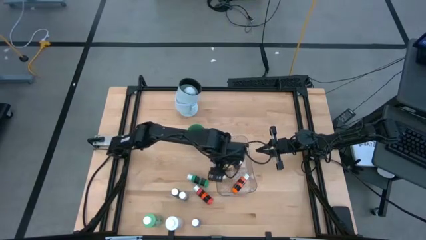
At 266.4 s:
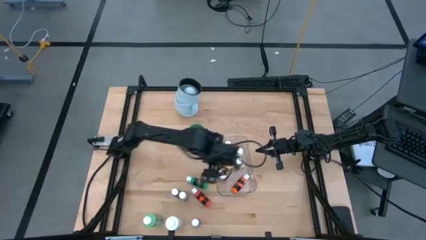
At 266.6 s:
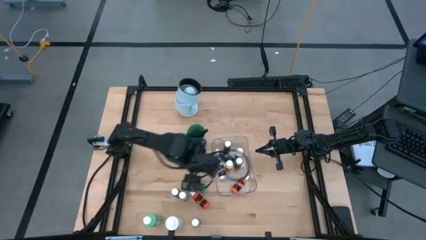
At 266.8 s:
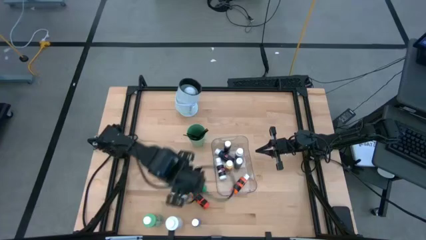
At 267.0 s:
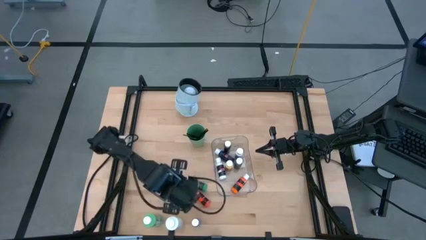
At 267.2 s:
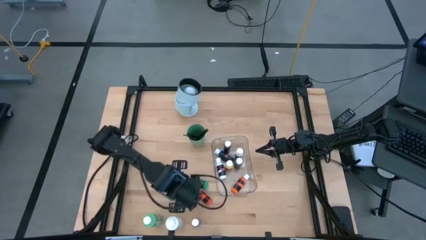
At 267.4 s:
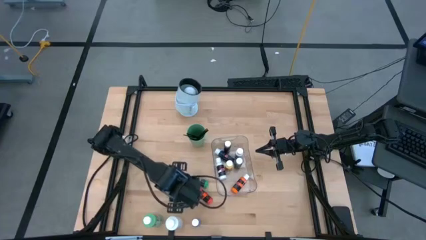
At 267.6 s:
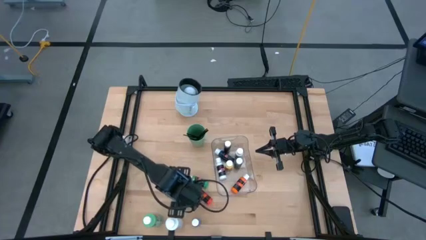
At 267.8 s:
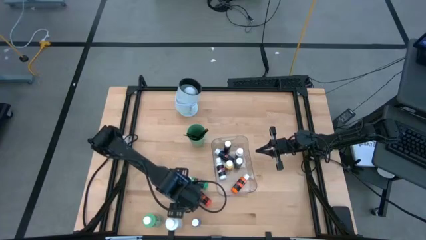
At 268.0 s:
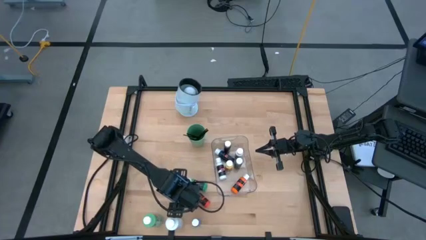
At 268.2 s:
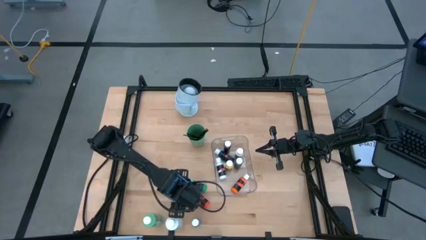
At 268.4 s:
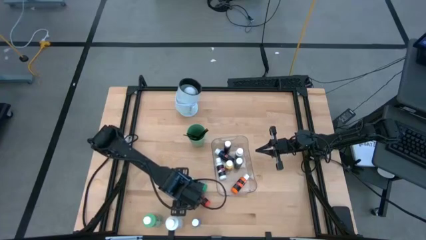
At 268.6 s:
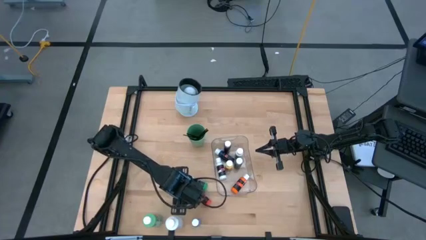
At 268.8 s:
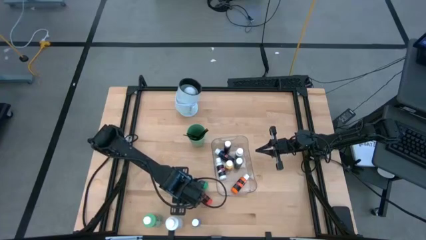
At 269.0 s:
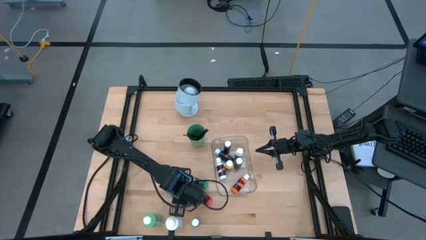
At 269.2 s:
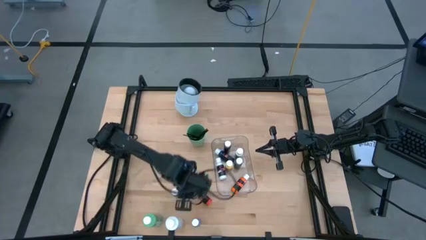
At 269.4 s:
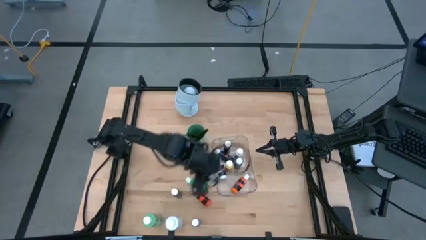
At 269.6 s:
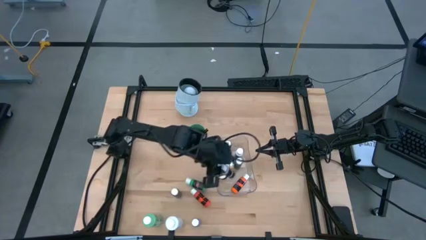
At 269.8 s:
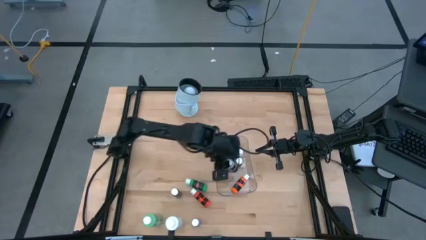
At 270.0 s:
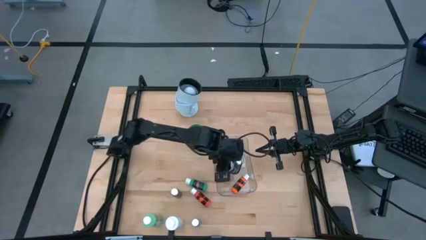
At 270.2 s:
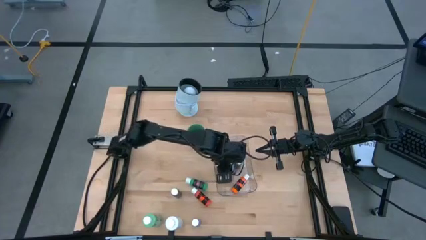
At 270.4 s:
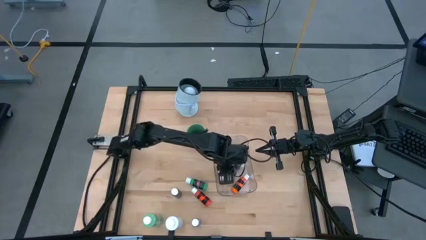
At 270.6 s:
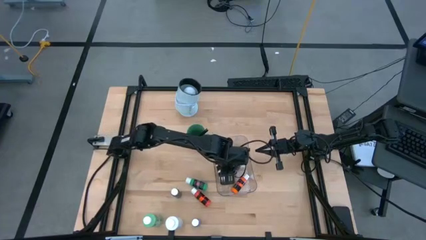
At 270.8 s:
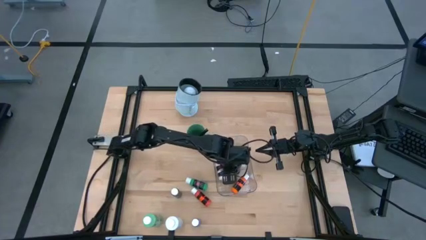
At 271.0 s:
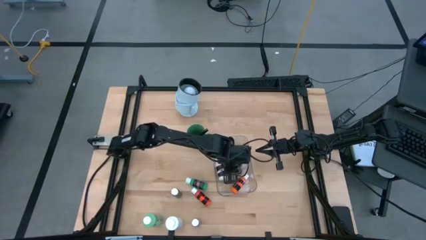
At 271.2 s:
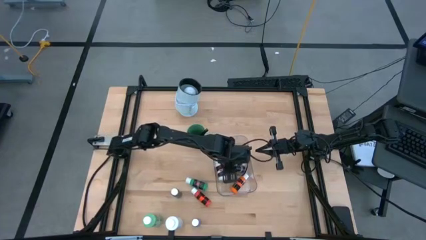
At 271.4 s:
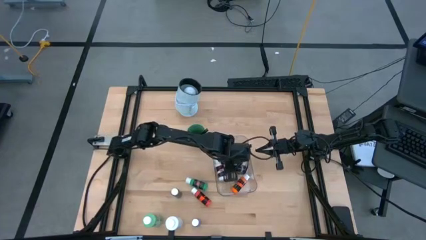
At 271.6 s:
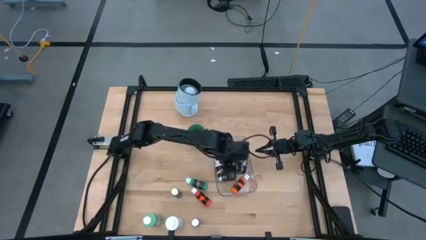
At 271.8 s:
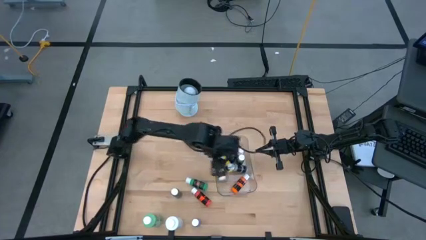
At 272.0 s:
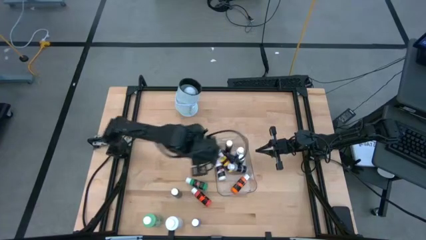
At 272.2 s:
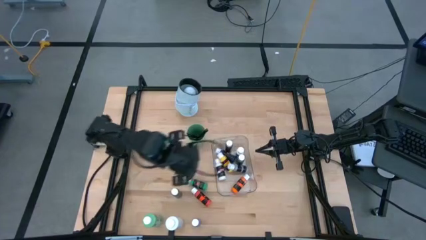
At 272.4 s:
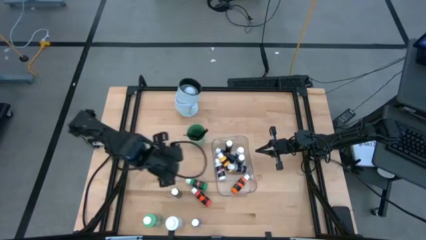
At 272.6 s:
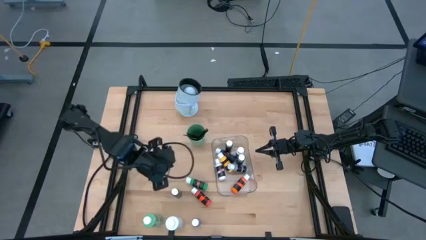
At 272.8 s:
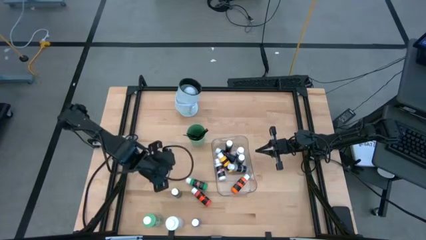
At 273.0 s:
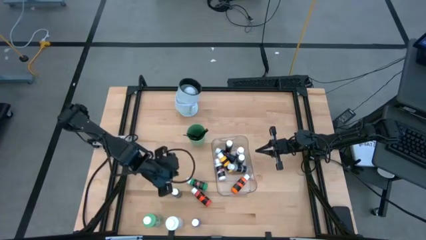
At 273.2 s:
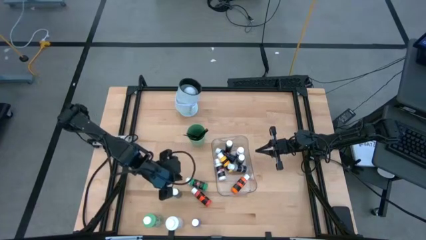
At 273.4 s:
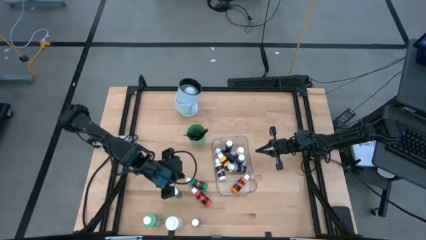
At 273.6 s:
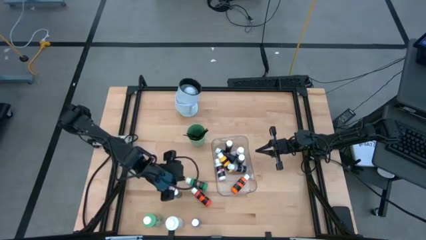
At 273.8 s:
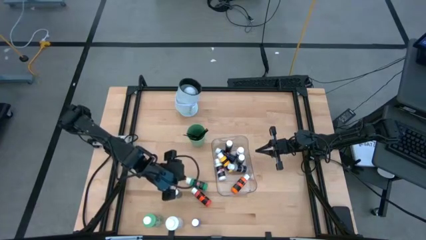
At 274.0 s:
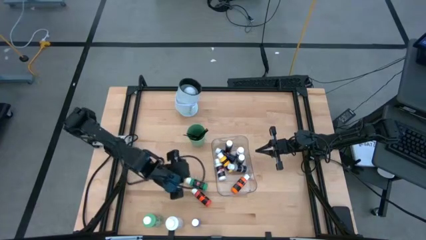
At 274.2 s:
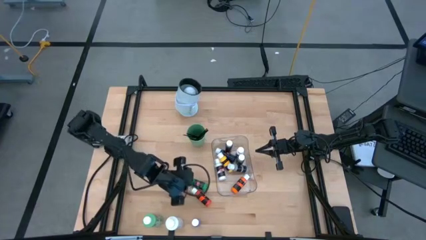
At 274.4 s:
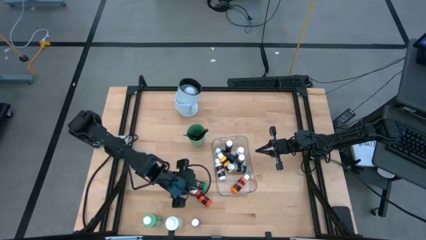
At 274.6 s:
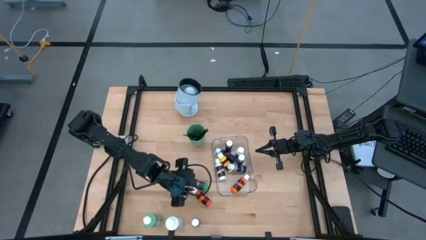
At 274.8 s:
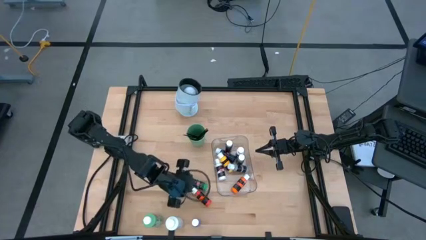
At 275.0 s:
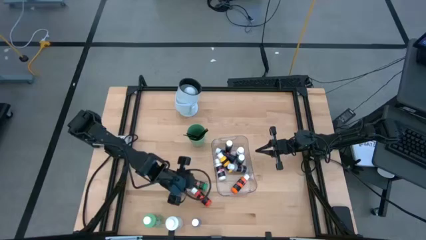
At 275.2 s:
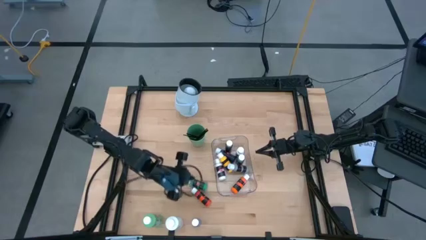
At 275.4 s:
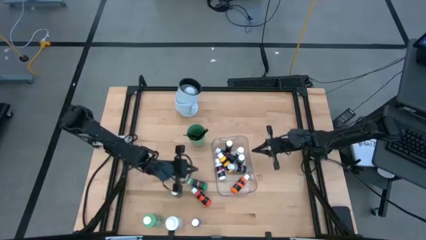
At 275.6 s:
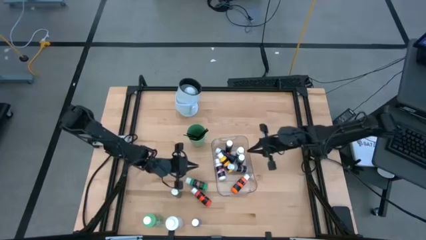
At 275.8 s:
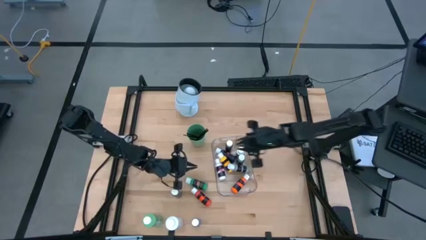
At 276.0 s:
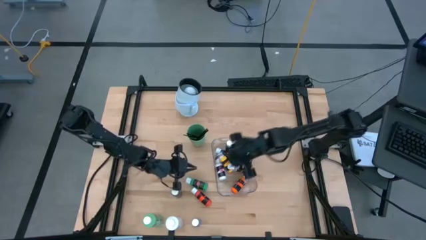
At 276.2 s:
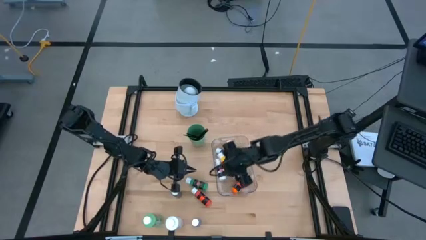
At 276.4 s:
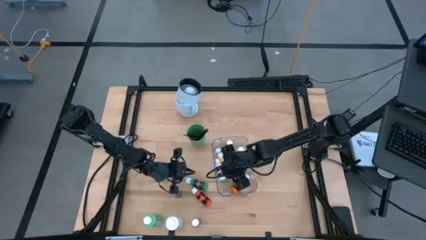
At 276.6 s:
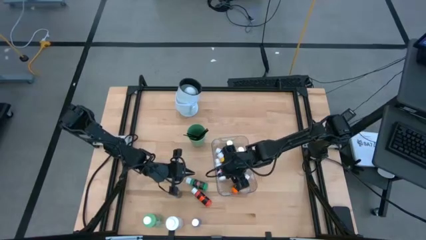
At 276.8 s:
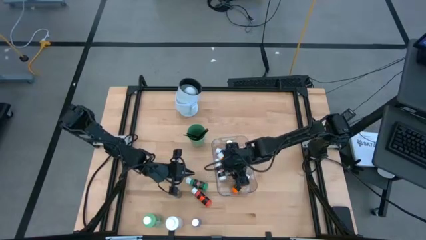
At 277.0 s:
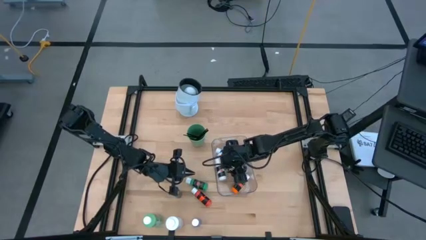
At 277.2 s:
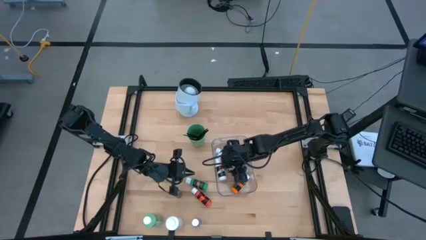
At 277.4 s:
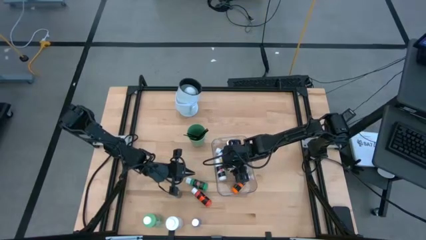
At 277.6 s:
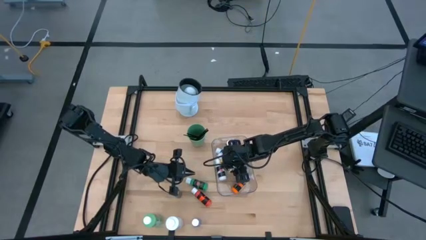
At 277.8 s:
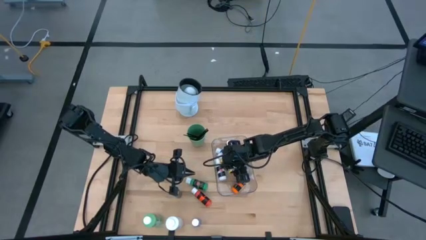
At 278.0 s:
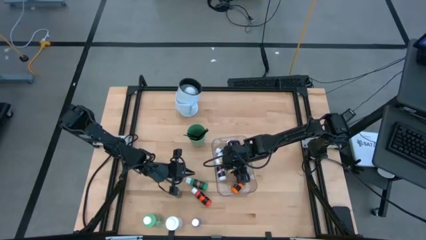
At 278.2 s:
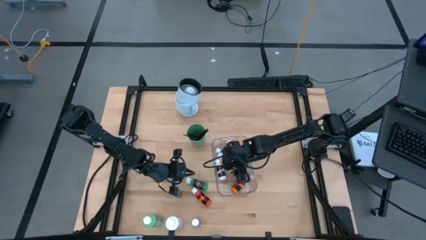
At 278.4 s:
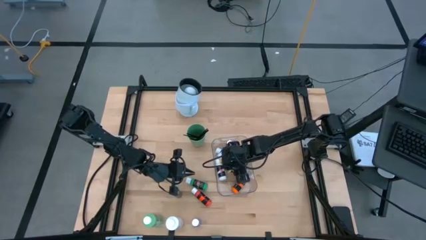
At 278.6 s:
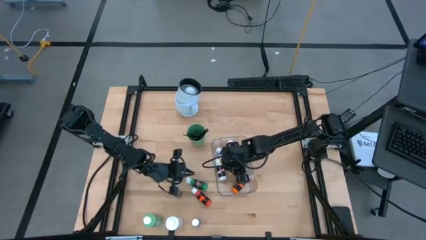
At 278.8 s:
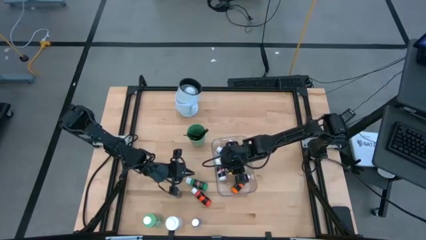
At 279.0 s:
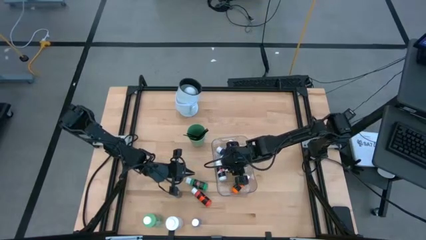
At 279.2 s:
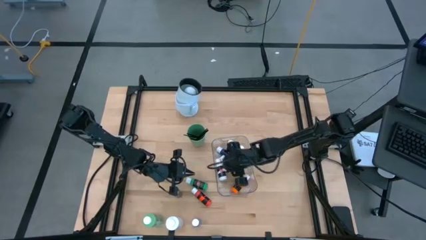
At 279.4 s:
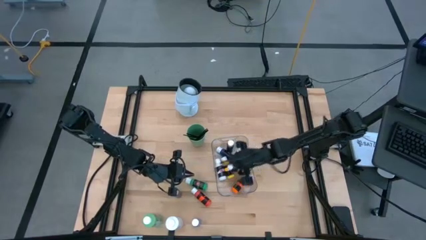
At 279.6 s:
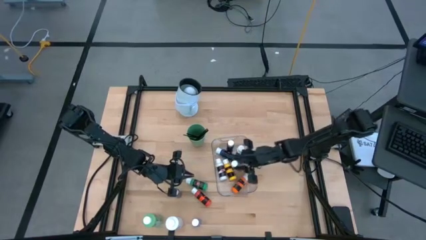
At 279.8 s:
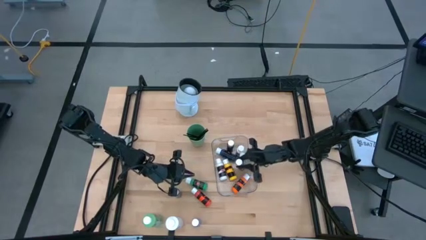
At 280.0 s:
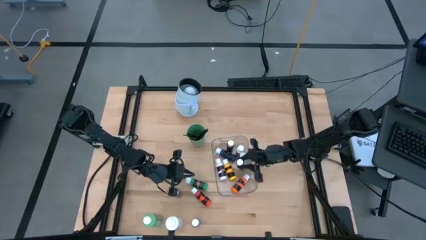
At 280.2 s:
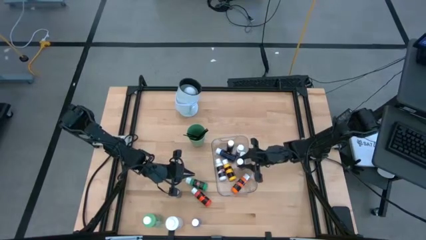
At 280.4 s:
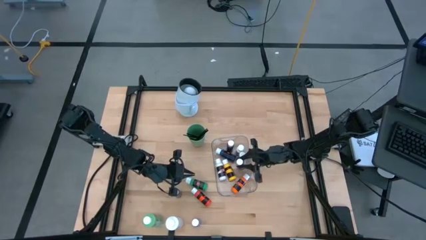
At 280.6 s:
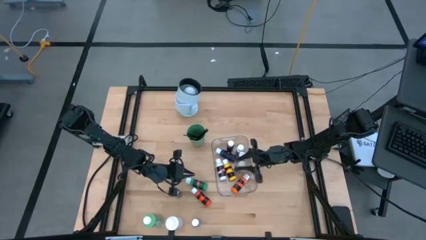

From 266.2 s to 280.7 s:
Task: Pick & Place Paint Supplies
Put the small gray paint bottle into the transparent bin

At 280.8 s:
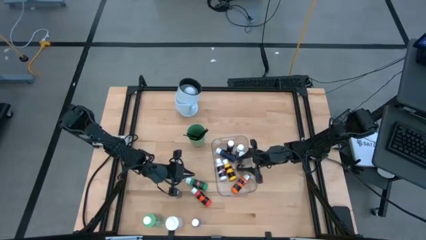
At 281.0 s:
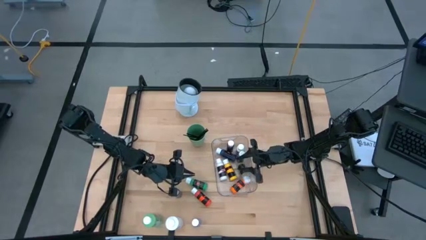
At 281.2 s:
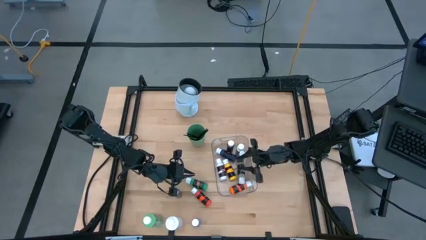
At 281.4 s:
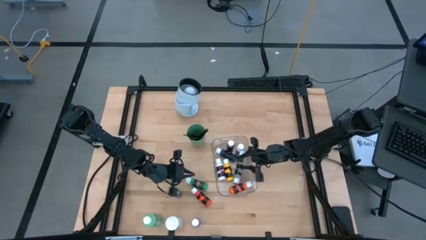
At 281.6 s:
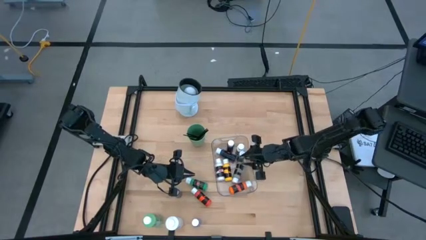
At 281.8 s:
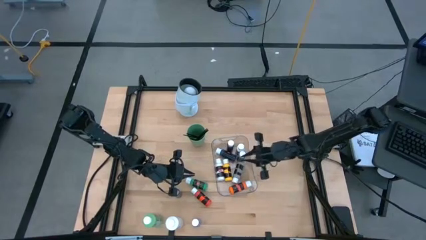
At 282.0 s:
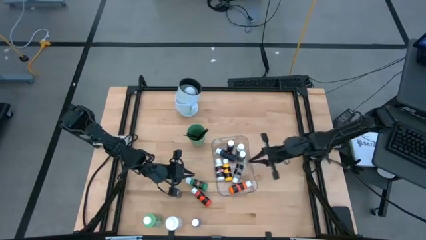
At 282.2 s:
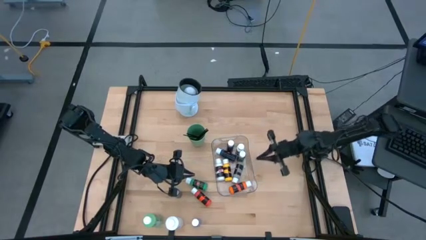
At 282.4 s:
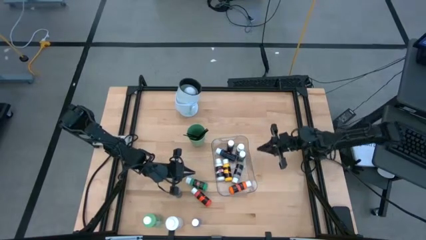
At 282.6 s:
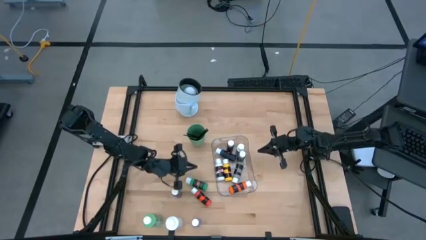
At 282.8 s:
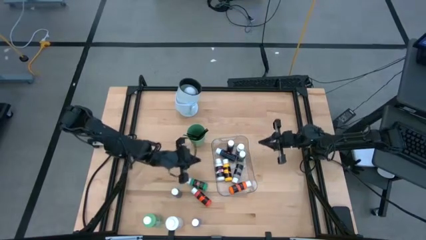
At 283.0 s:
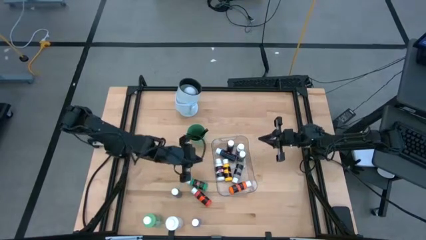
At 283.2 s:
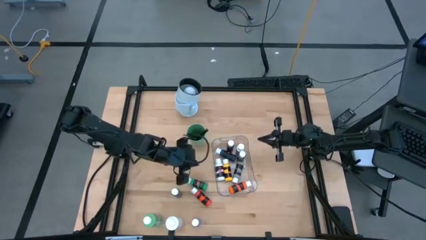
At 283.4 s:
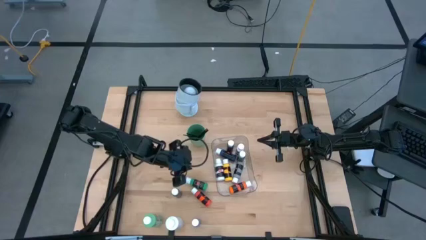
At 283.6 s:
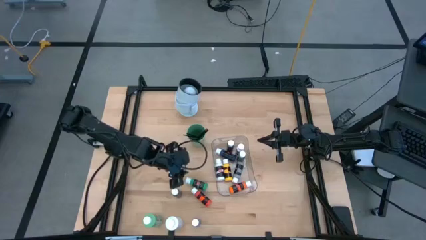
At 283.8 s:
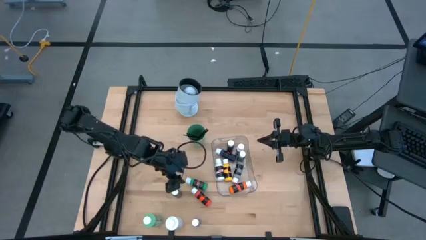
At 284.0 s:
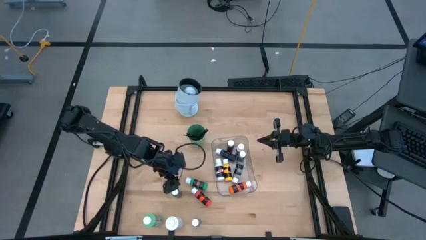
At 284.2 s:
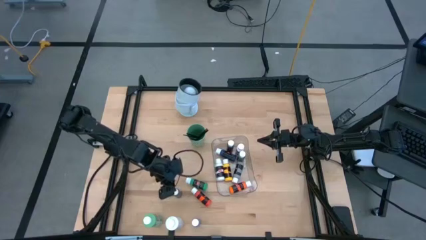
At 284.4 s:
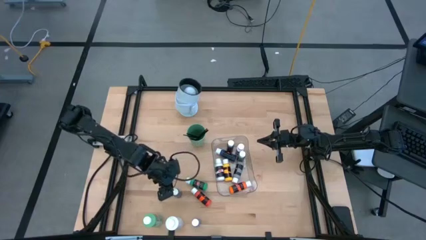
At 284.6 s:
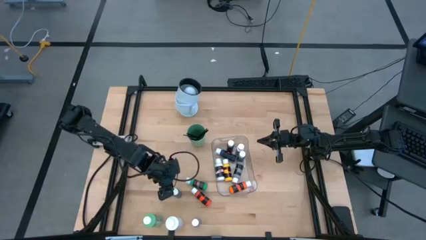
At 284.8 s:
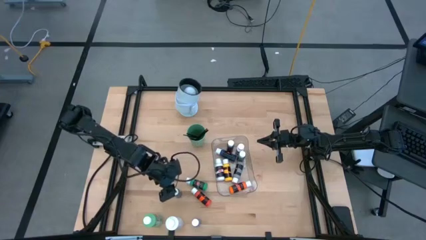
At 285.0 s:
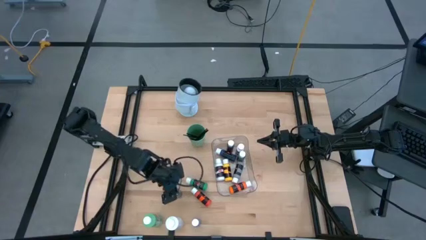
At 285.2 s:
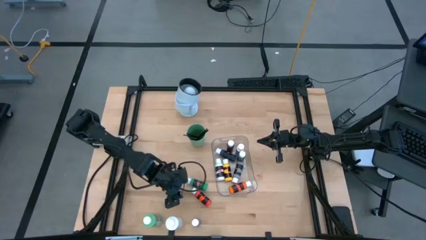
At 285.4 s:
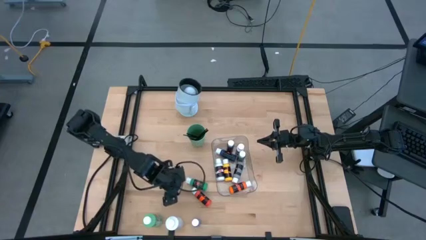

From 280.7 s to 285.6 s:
Put the small brown paint bottle into the transparent bin
